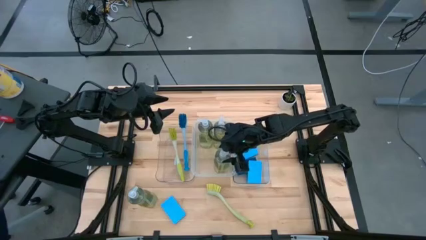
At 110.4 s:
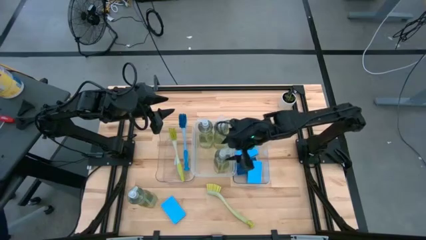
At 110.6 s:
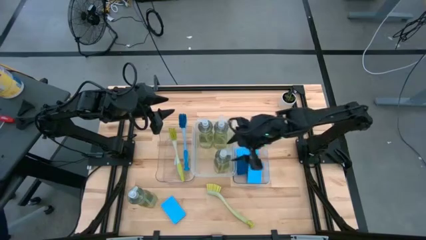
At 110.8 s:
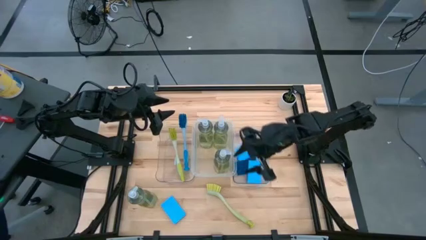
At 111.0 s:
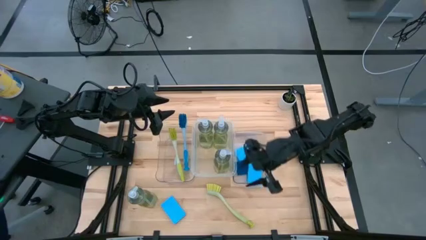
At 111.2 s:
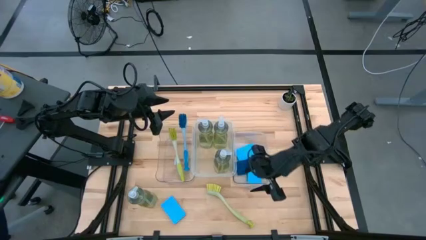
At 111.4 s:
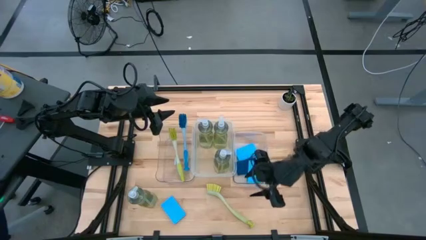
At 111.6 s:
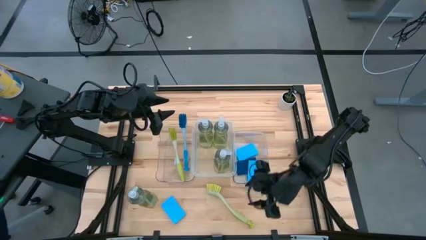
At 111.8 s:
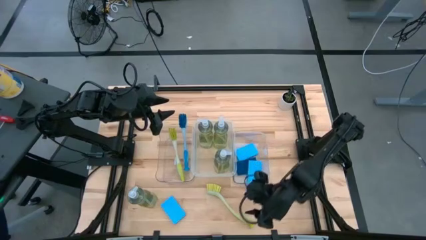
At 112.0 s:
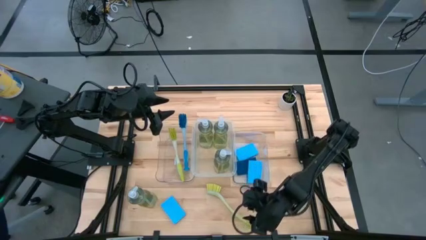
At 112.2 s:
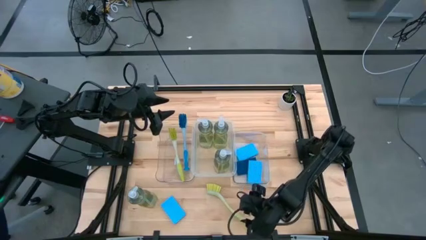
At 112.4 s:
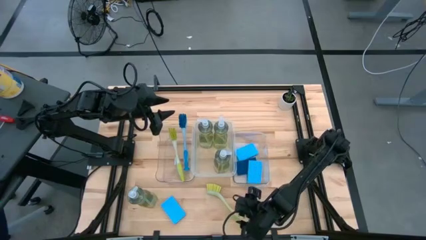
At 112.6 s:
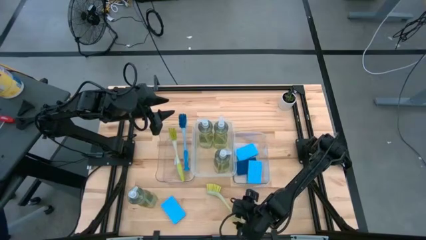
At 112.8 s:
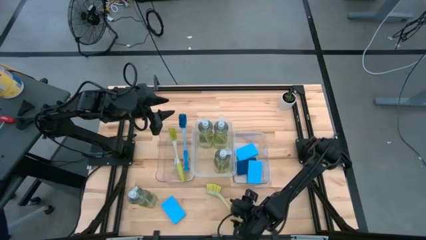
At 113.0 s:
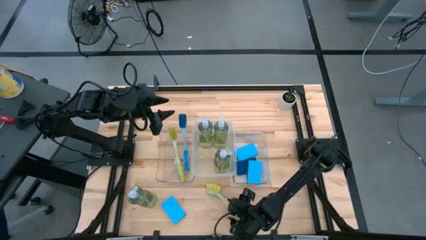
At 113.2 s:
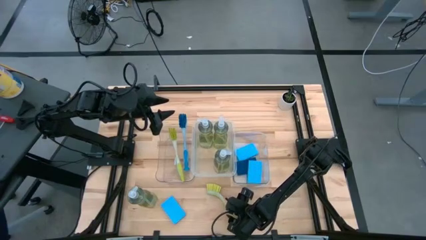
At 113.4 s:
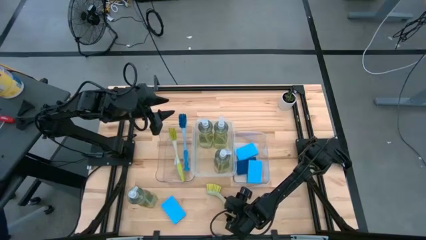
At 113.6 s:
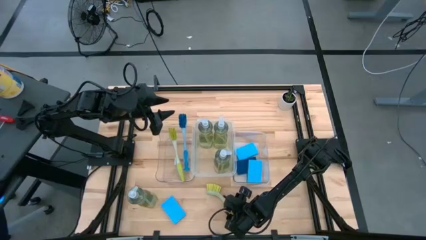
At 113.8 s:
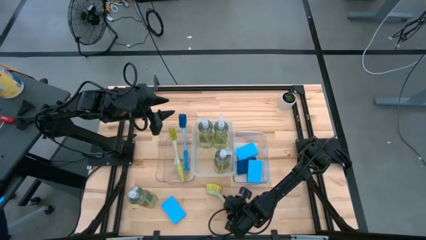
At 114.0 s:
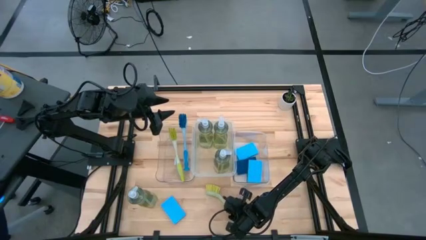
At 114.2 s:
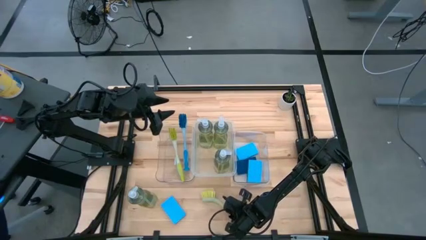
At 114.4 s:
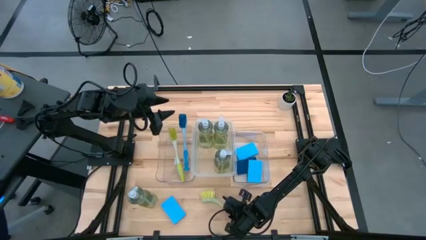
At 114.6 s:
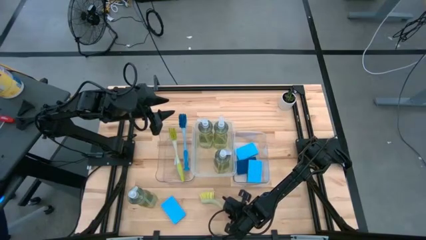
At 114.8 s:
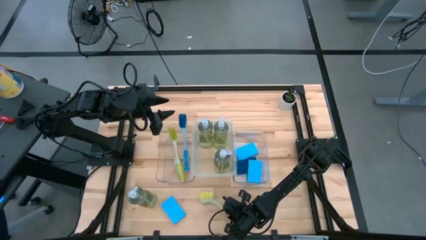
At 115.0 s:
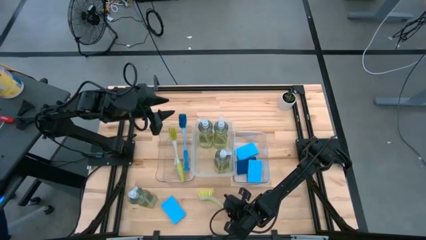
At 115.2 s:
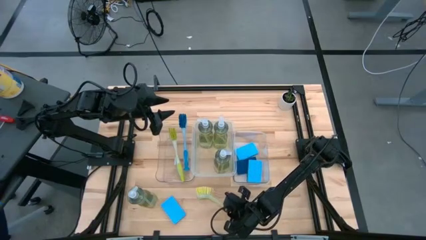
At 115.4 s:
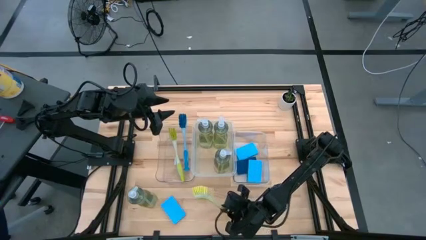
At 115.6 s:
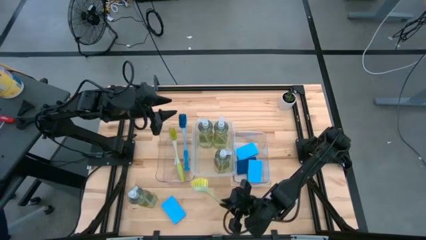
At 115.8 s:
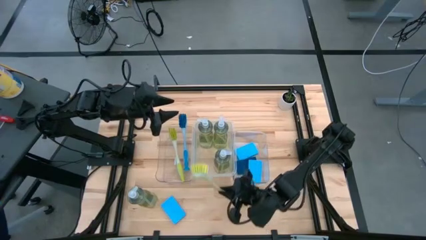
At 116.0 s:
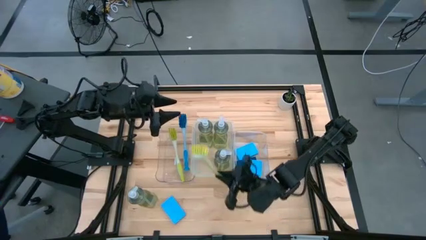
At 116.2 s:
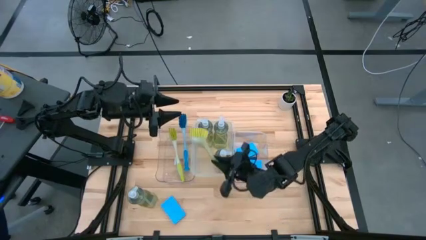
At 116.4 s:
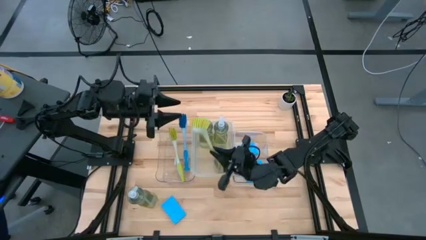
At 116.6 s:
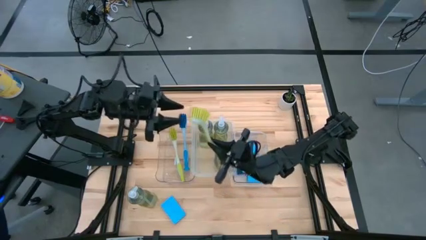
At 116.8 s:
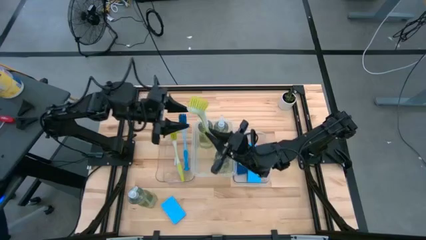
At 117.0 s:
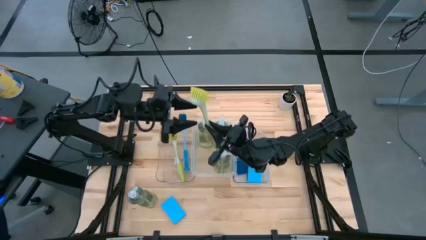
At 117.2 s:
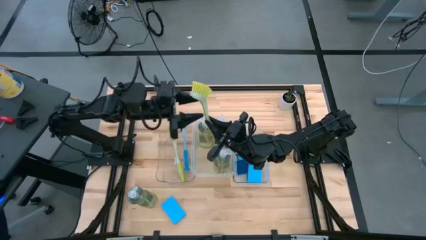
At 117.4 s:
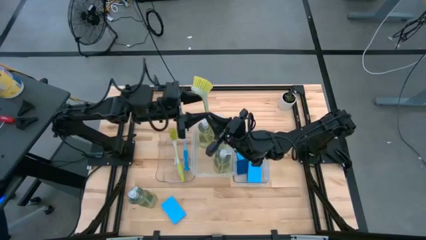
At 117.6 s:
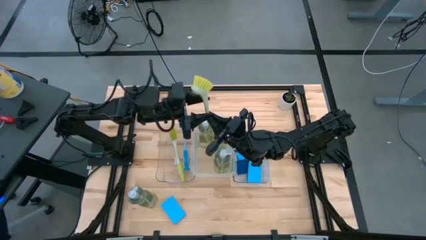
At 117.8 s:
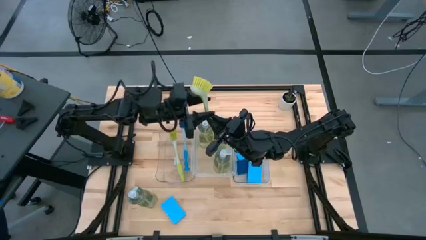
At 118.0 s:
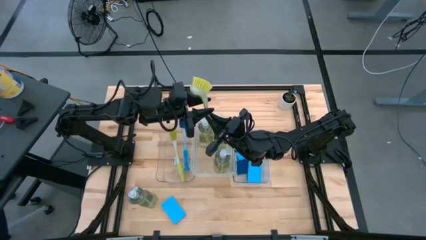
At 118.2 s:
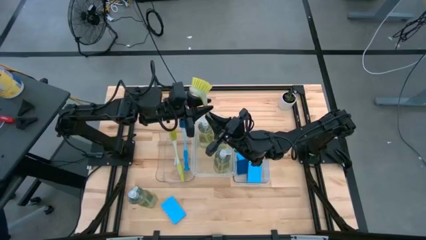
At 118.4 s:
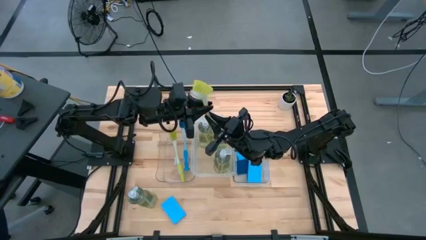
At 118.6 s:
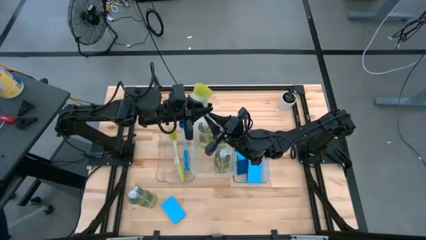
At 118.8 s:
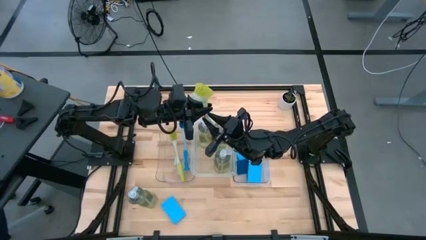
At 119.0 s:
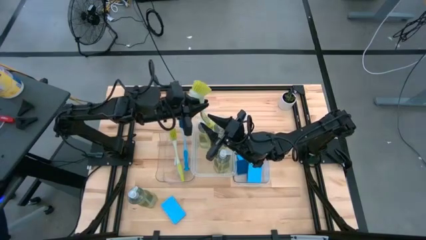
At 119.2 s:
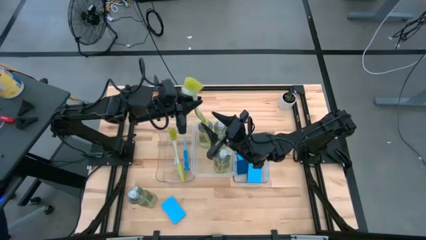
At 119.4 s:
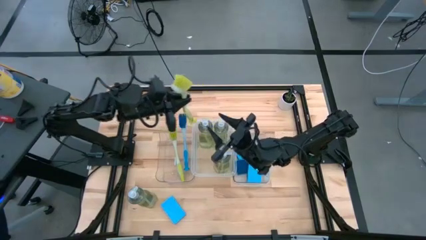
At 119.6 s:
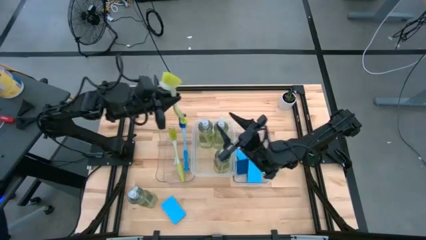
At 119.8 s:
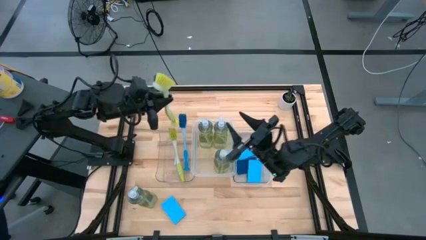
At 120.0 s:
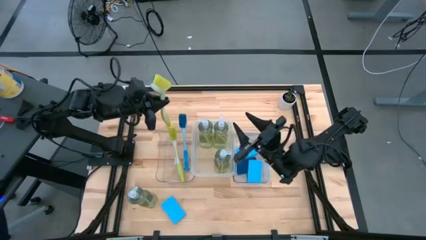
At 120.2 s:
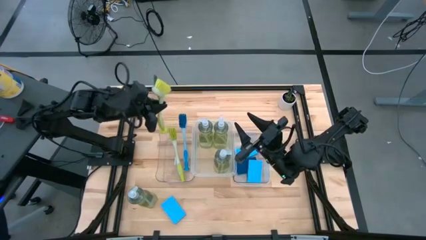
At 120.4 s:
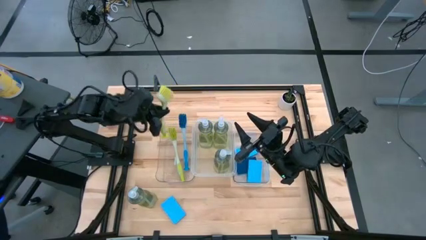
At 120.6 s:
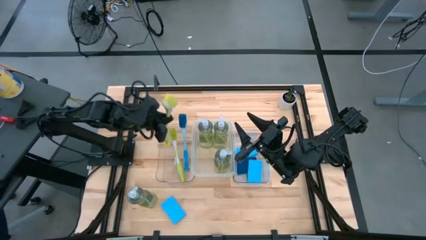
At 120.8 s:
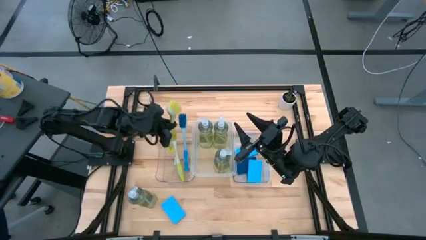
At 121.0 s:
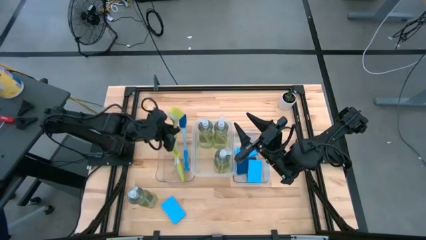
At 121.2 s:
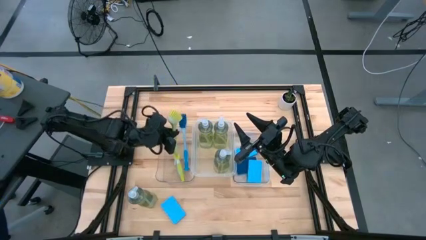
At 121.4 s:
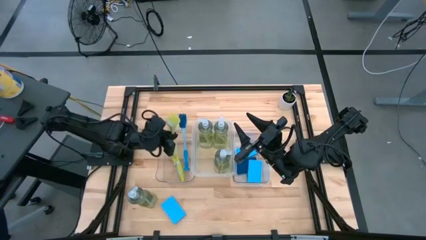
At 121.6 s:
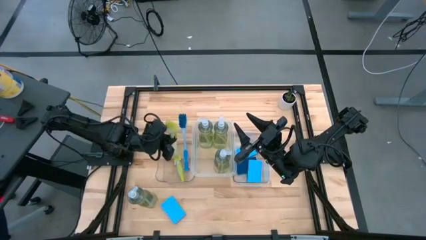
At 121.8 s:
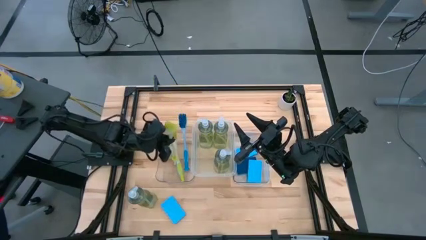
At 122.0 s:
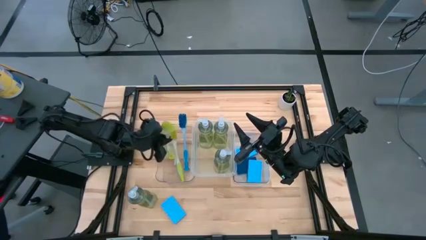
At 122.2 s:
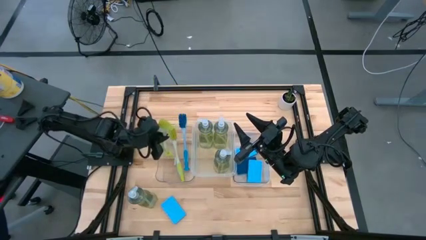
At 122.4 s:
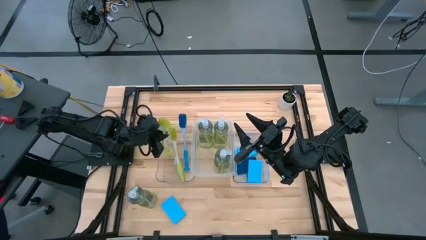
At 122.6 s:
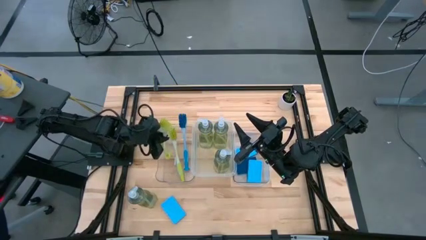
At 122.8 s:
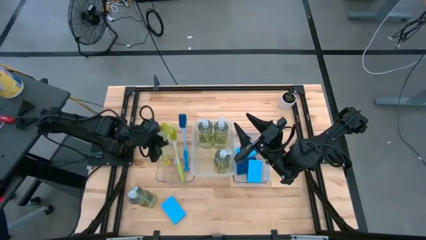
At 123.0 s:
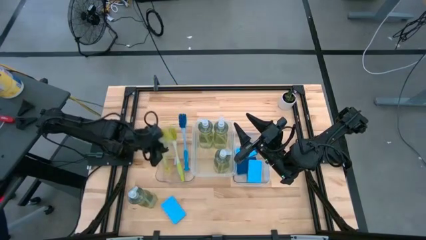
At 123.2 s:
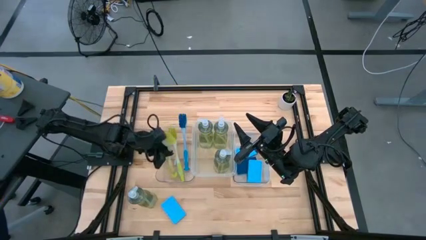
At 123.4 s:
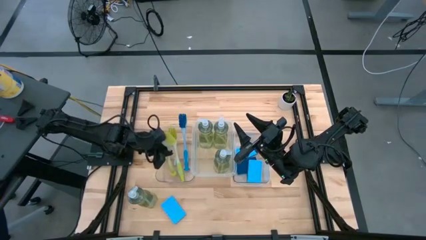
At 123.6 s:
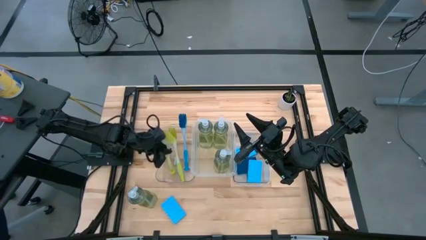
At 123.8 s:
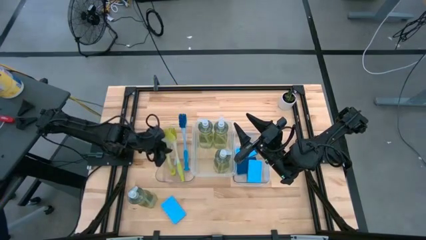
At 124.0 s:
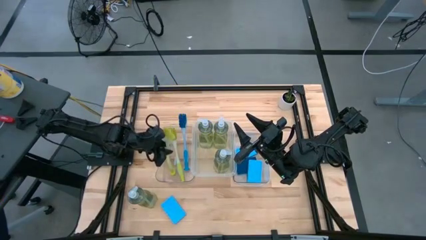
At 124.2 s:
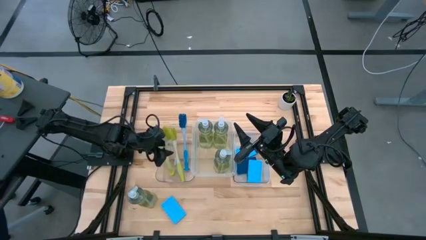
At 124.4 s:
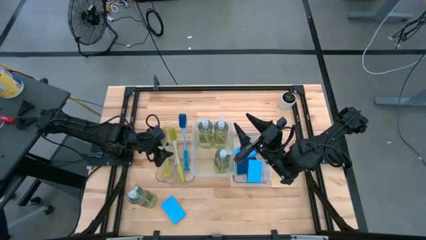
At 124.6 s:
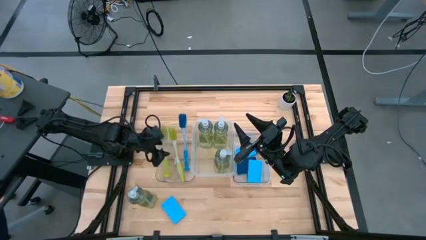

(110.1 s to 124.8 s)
Task: Pick & Place Kitchen Sink Supplies
Put the yellow dishwashing brush into the left transparent bin

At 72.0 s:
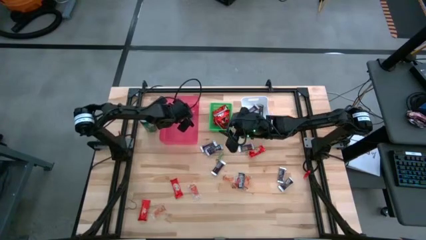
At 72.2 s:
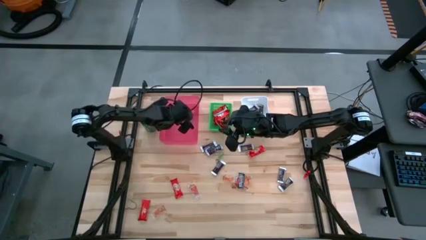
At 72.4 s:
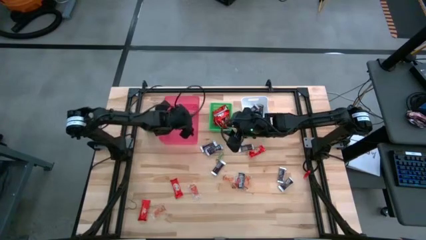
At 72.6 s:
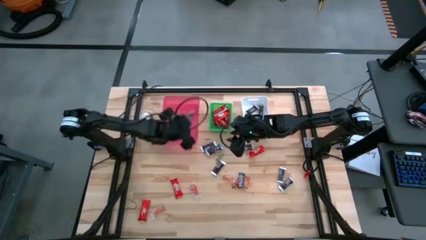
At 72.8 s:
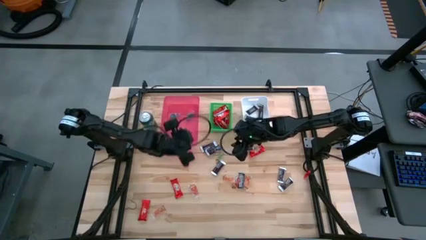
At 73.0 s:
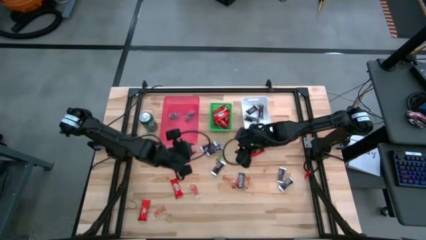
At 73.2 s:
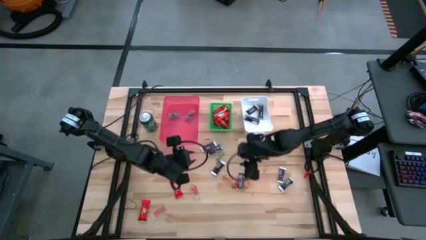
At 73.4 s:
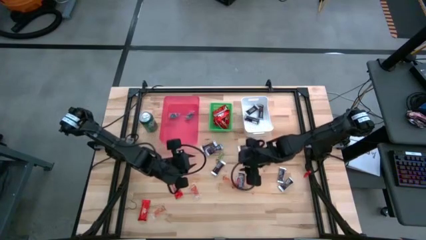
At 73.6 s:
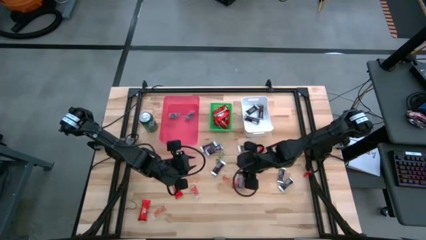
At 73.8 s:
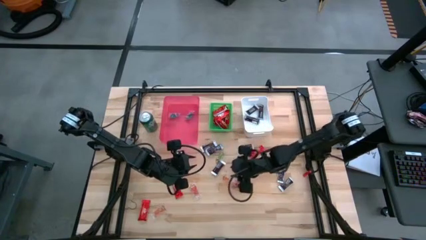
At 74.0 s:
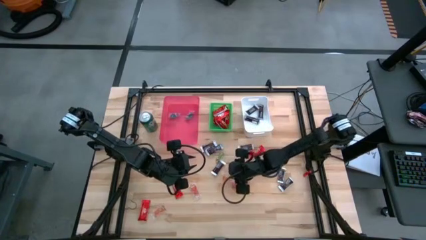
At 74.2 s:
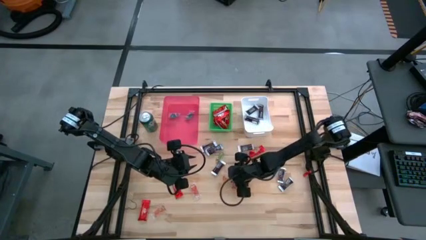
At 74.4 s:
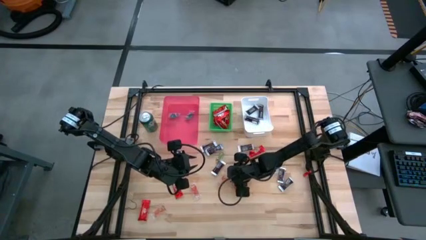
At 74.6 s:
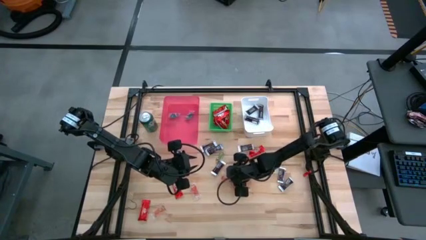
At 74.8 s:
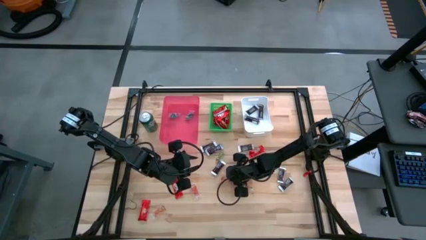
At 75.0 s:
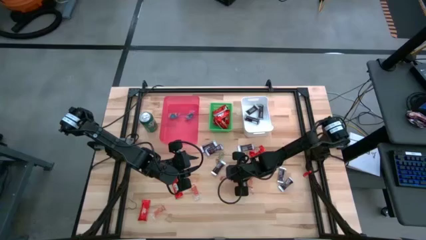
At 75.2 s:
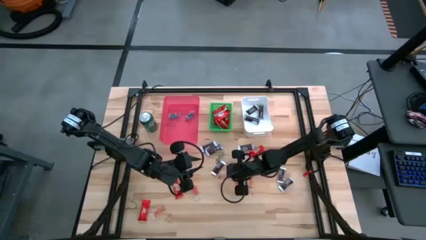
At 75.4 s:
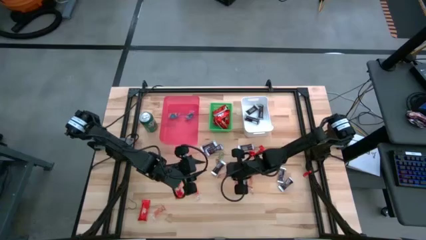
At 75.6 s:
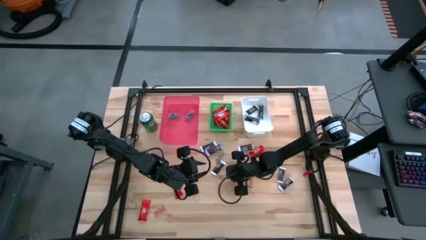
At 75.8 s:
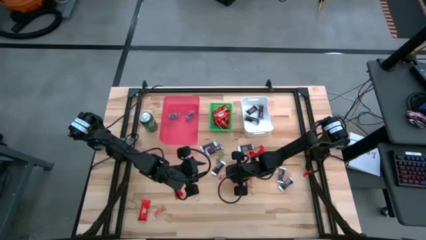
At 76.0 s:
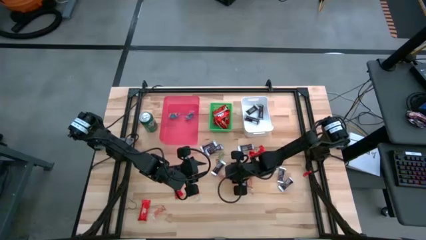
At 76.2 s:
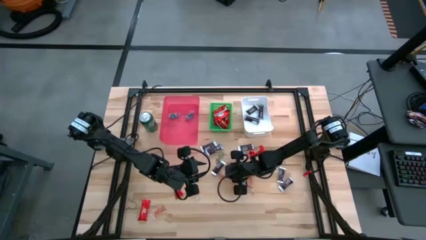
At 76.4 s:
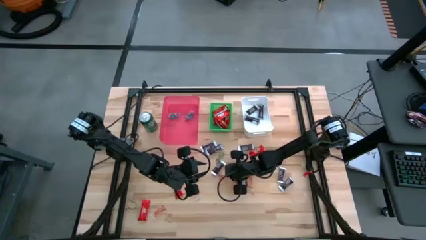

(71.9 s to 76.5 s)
Task: Sort candy
Put the orange gummy into the red bin
